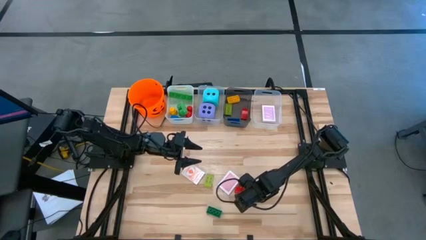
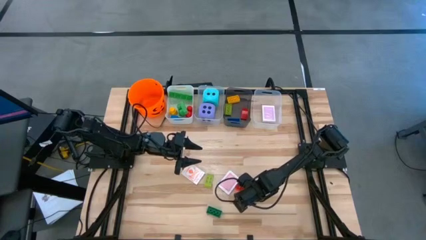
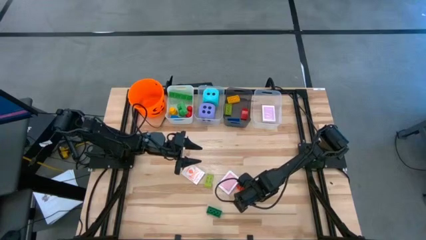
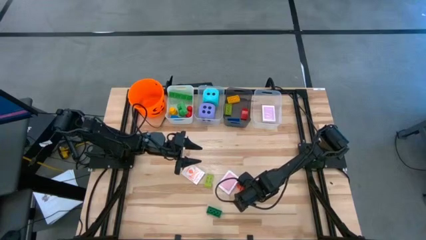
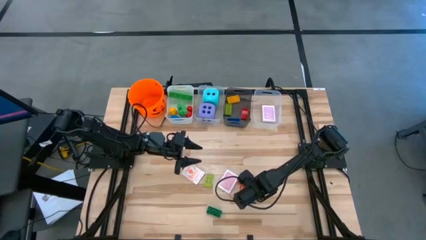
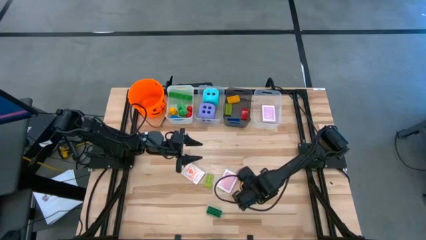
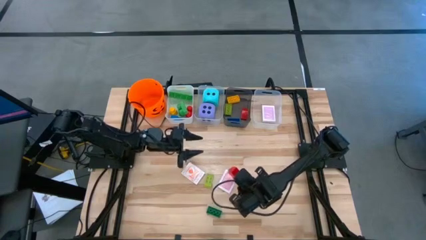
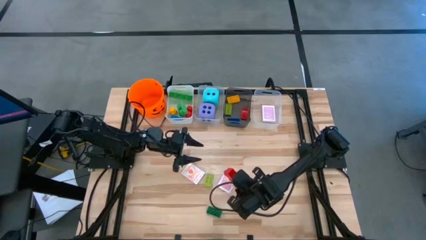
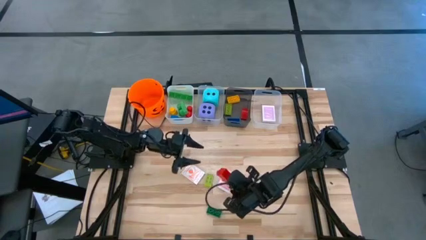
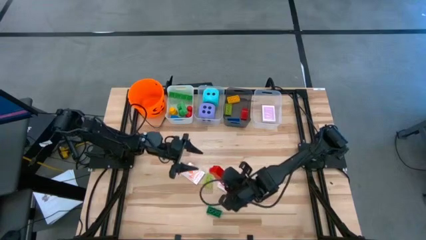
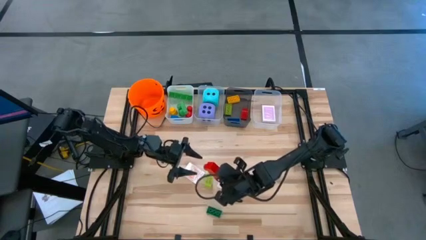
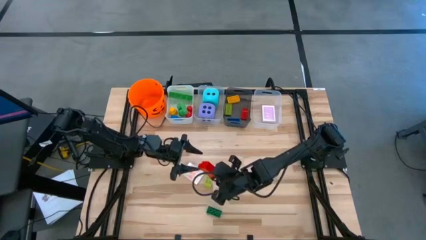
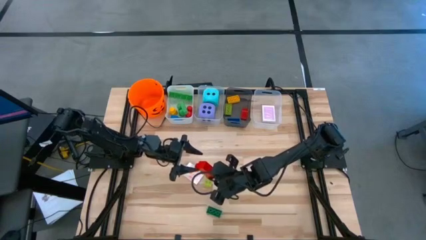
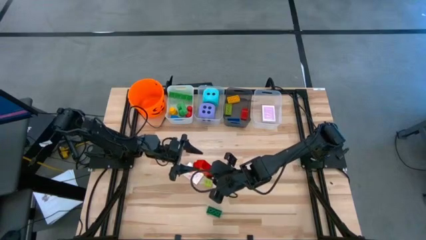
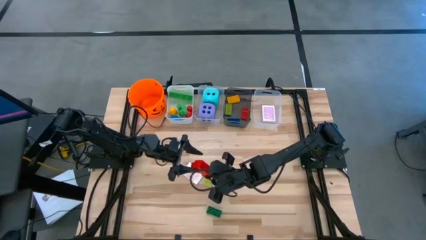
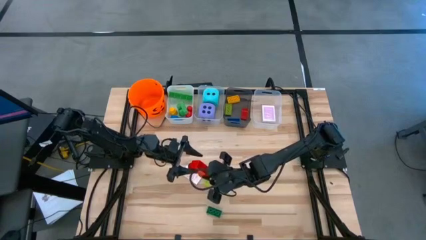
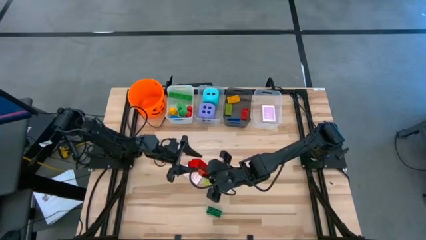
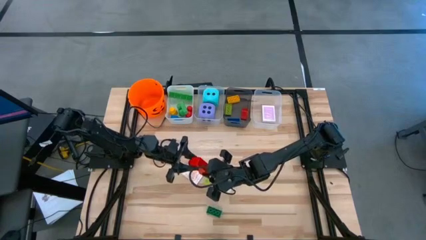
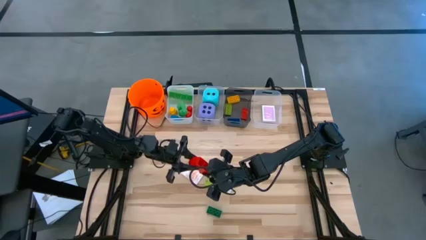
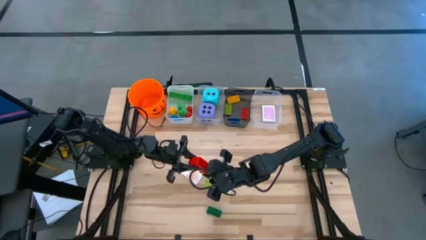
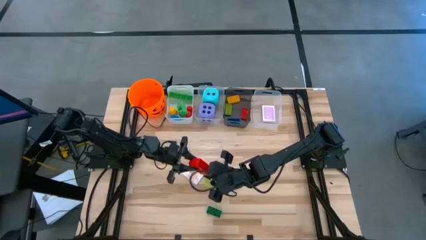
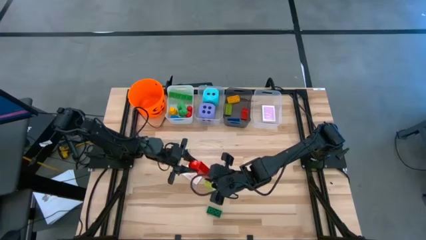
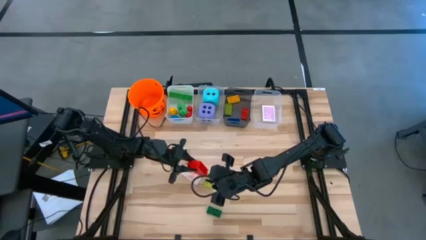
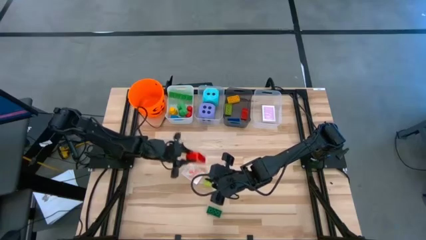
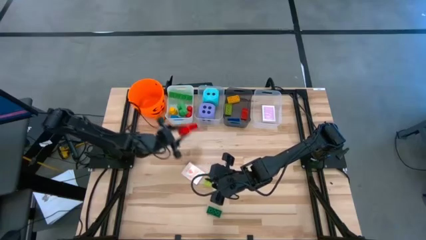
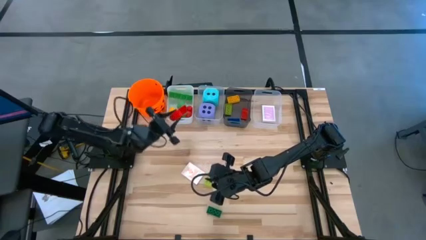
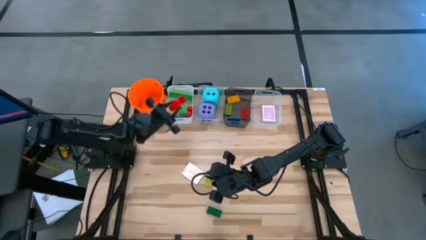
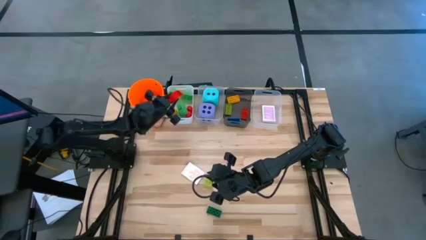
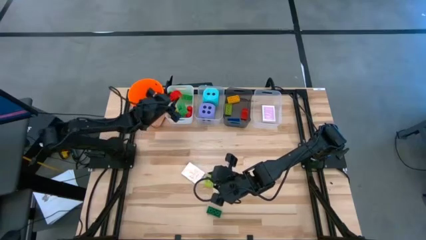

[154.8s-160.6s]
Task: Pick & Place Toys
Put the red game piece into the white bin

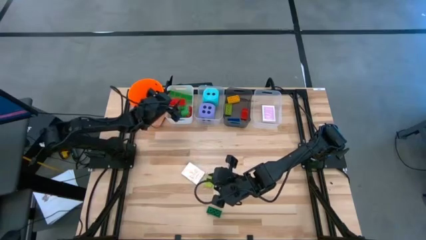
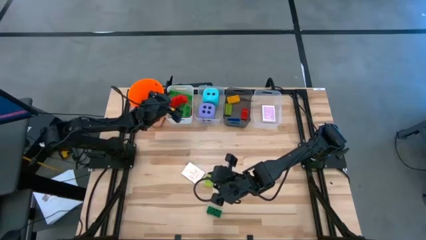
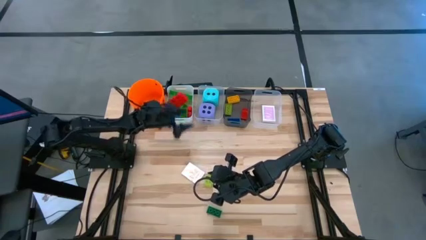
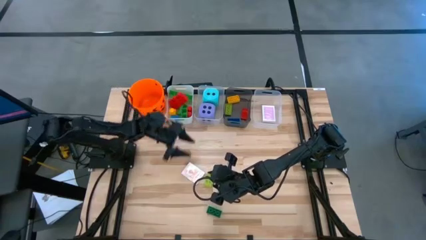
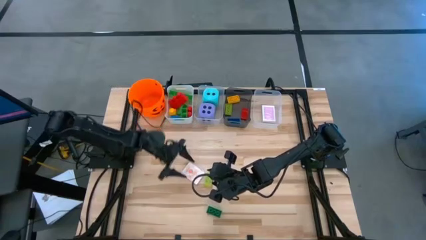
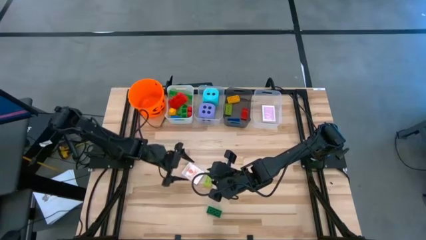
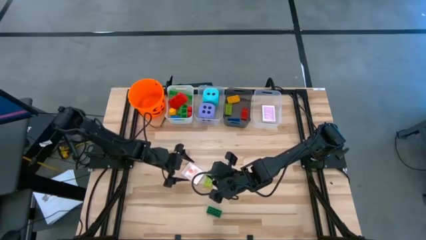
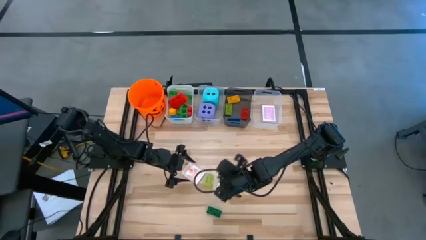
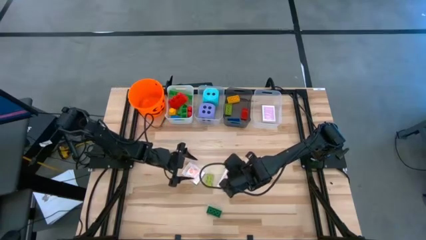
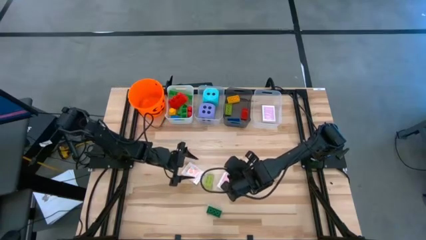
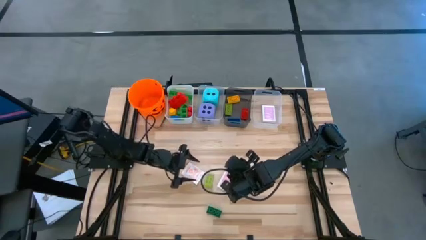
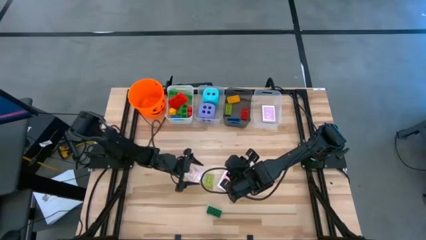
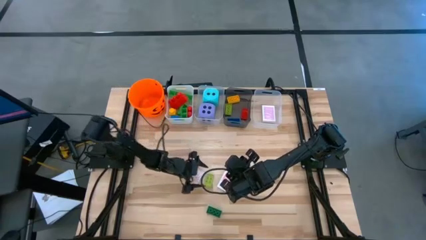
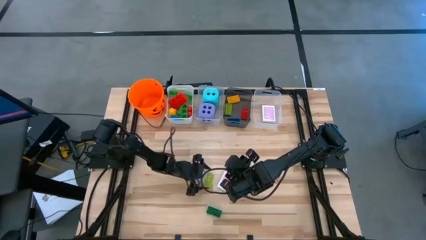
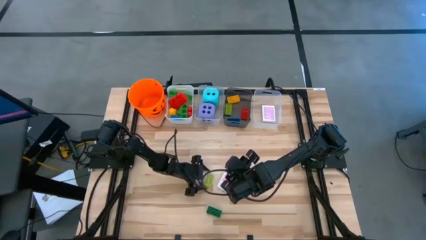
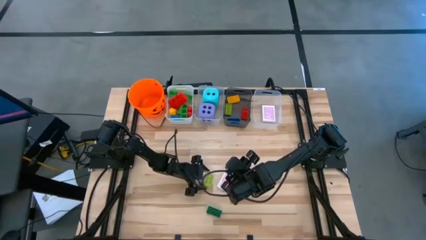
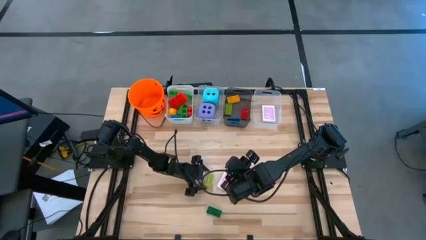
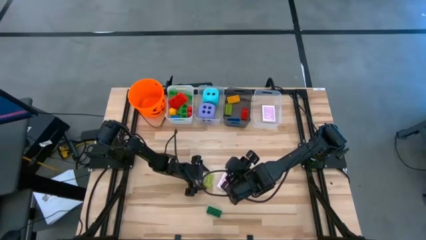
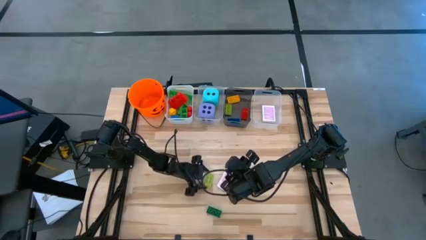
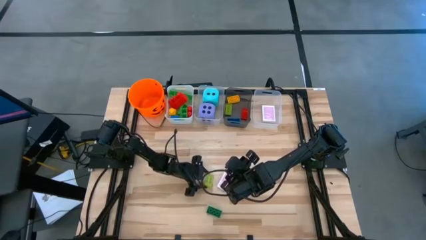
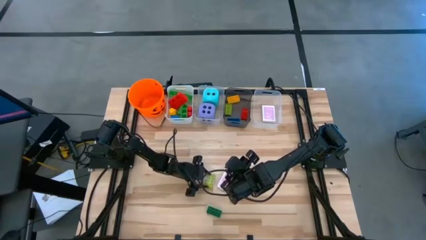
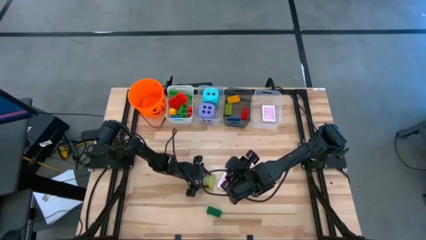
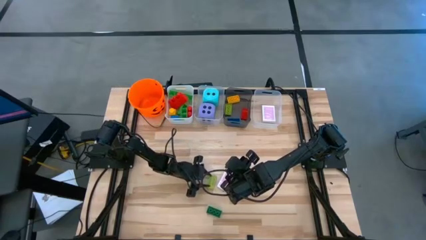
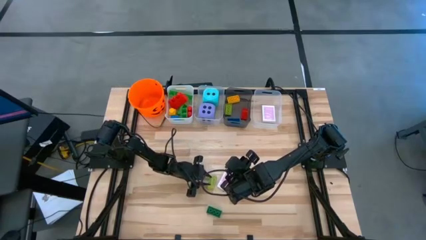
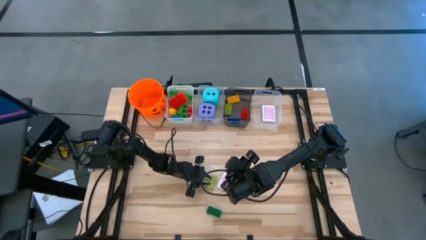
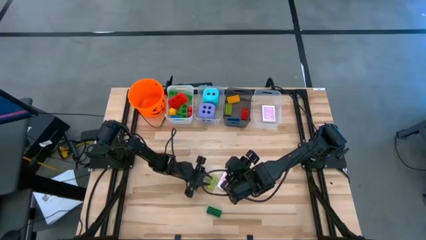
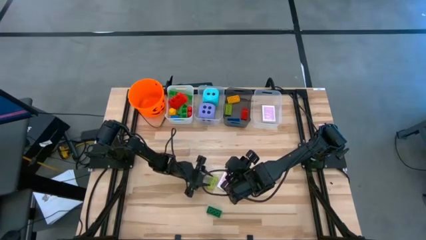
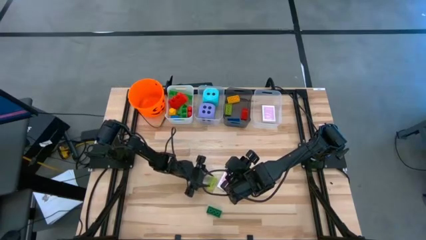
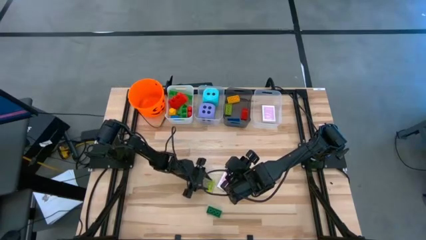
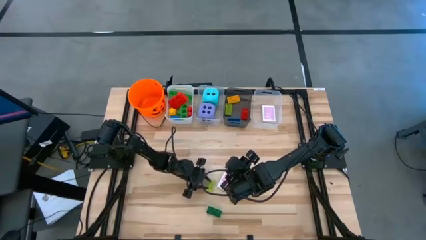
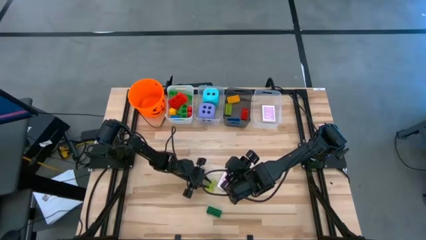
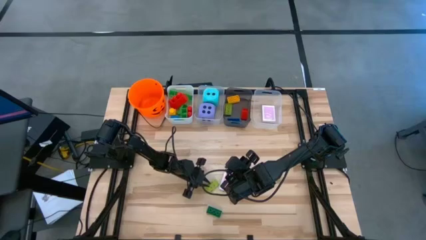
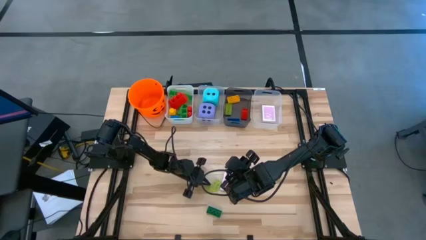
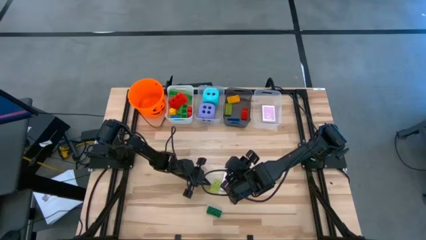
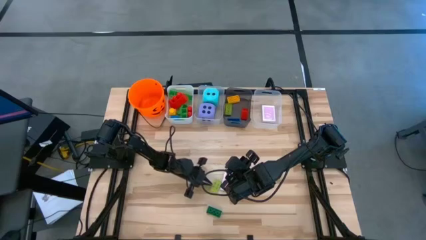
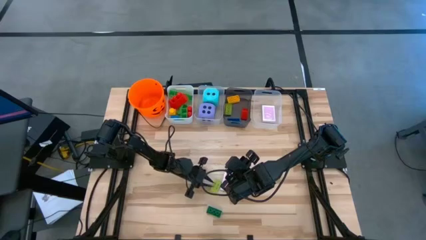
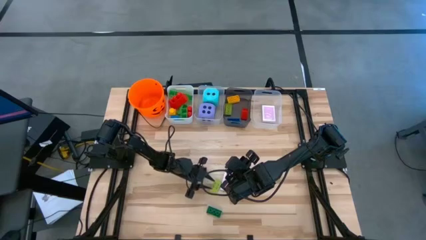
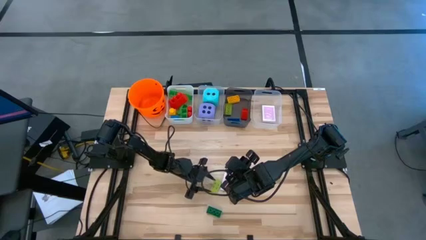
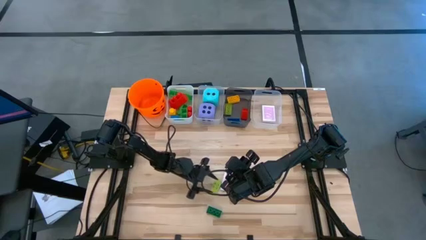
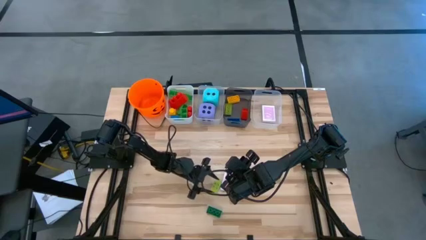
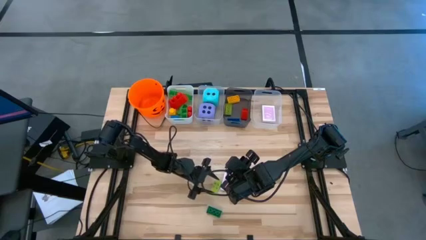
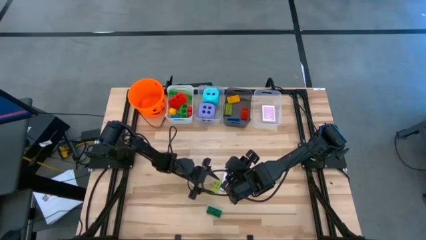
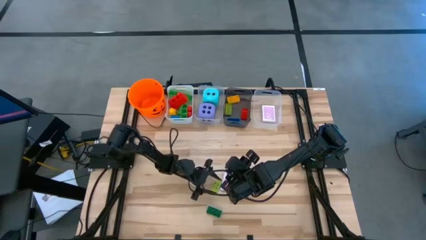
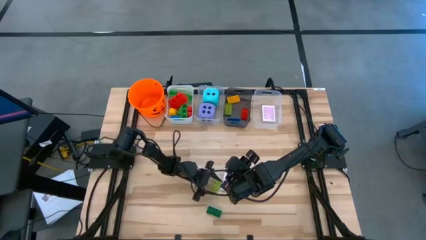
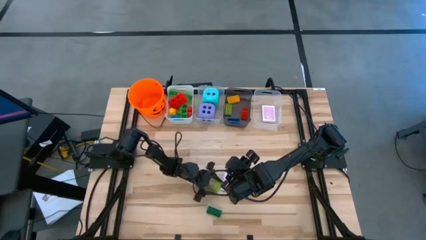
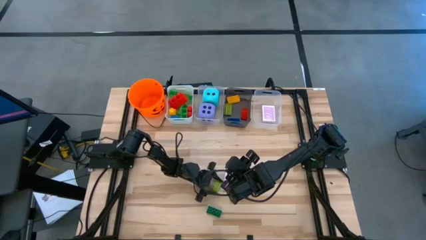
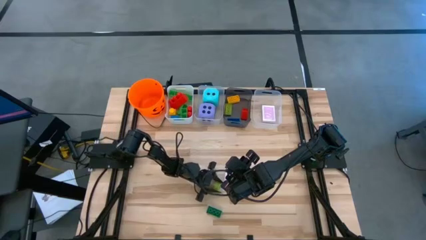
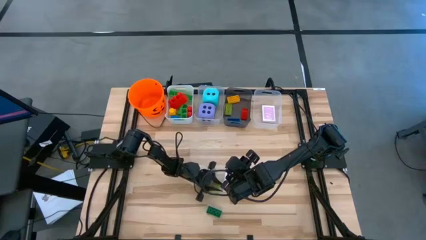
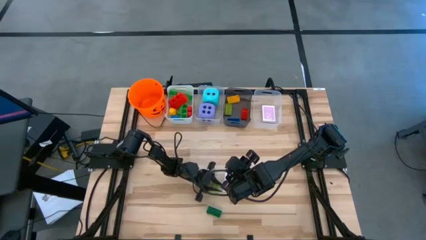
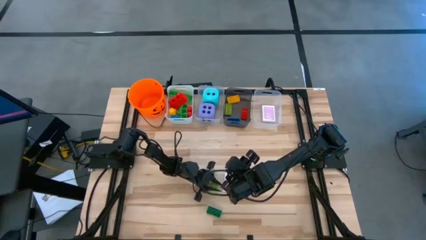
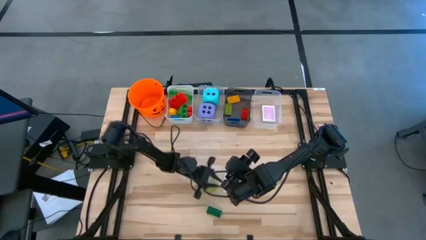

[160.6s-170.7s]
Put the light green game piece into the black bin
